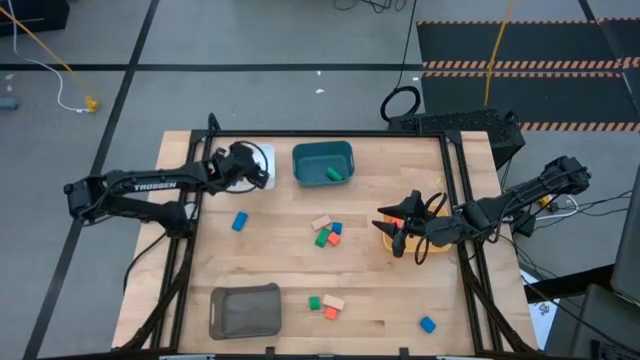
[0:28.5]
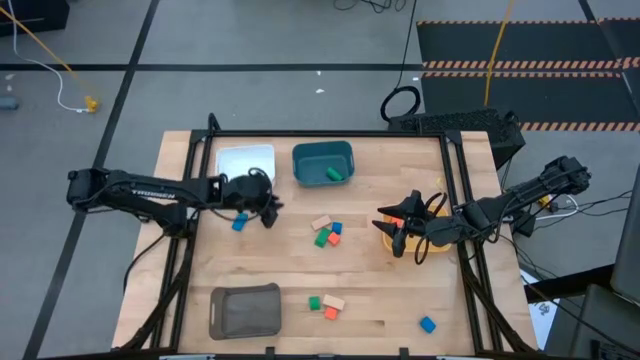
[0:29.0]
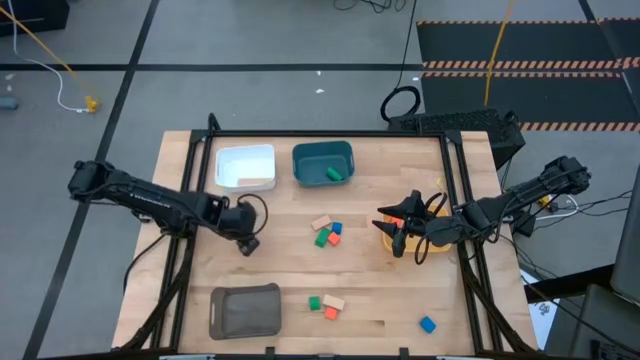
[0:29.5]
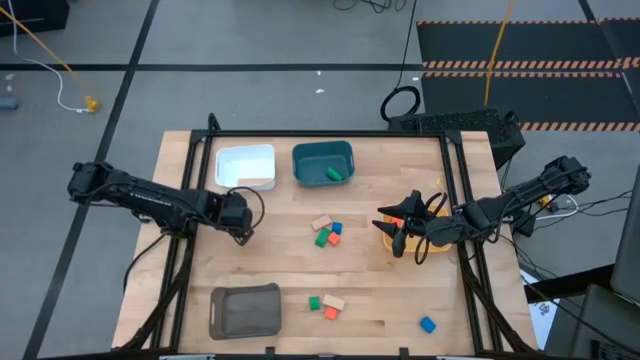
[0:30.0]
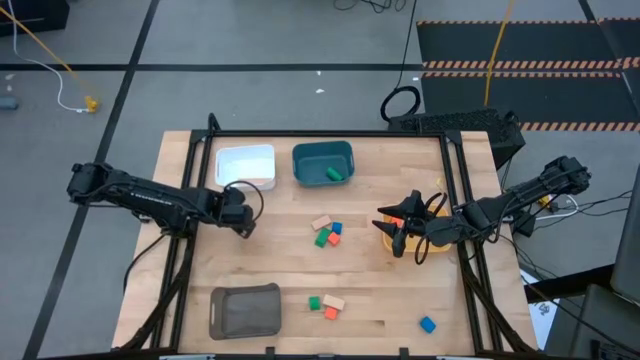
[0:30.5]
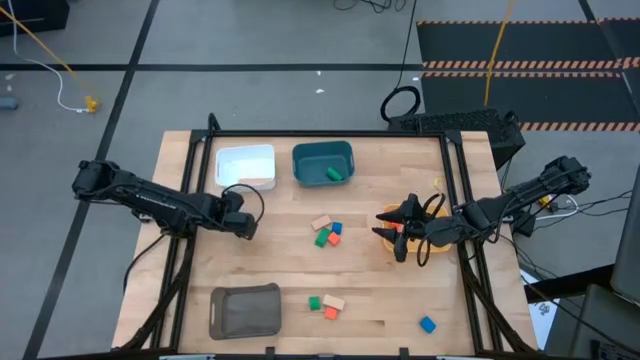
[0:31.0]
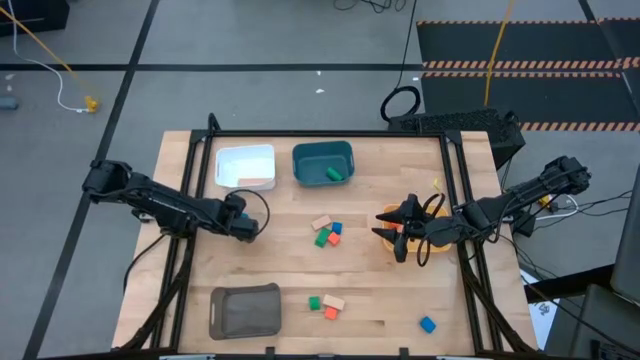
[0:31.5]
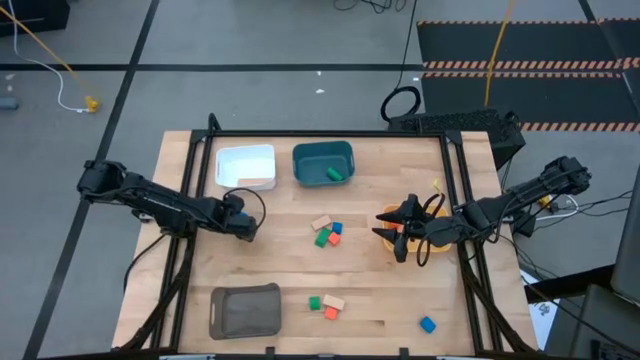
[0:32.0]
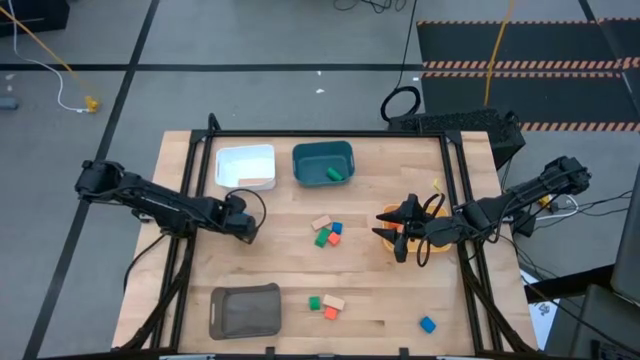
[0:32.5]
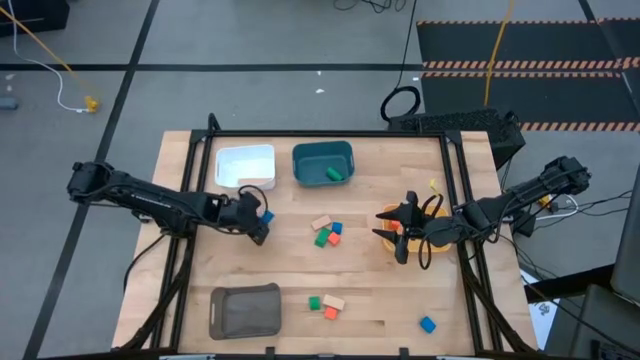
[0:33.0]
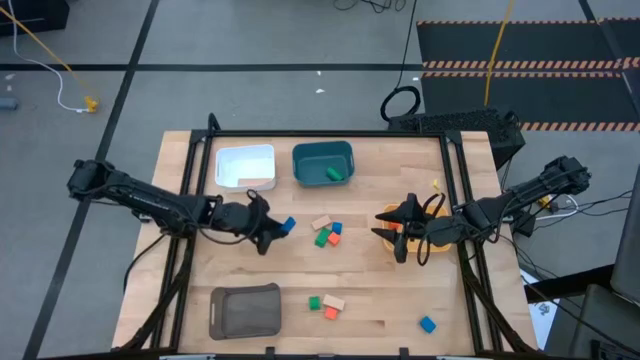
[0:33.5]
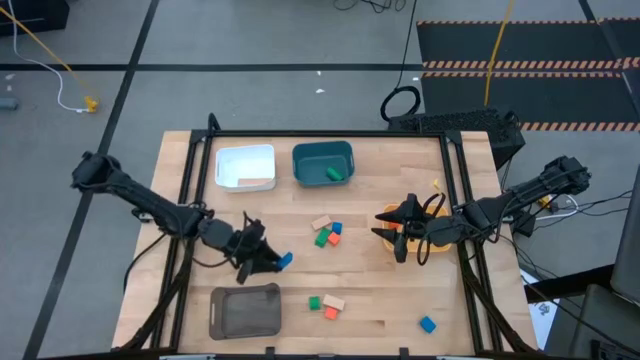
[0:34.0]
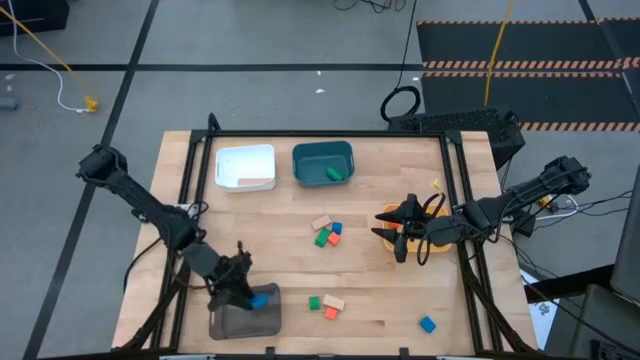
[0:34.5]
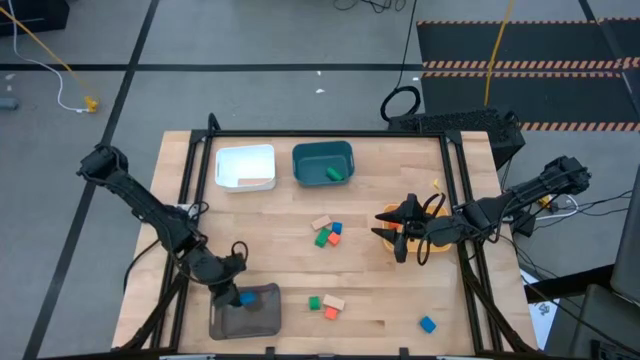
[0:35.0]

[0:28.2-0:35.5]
Task: Sort & place blocks by color
Put the left blue block into the black bin

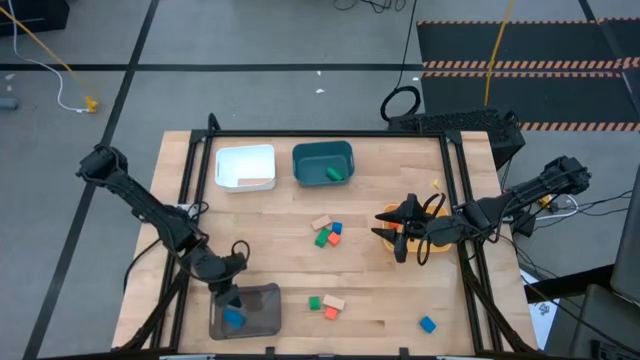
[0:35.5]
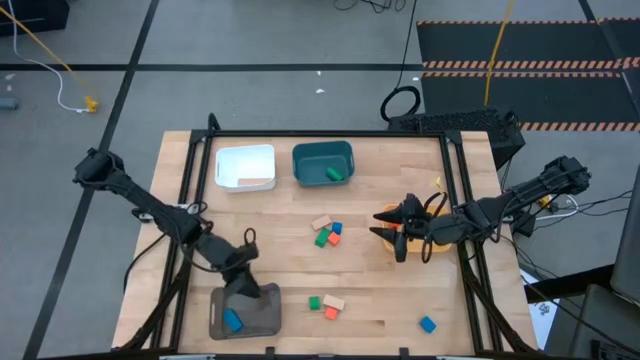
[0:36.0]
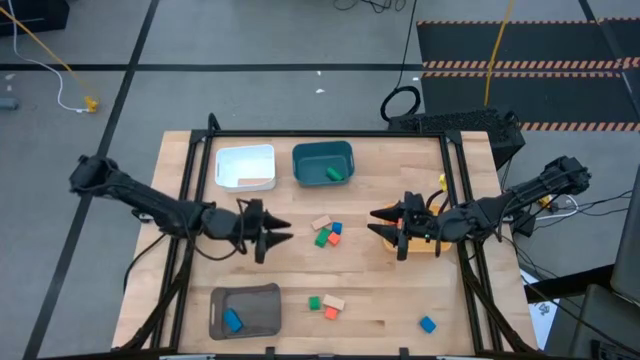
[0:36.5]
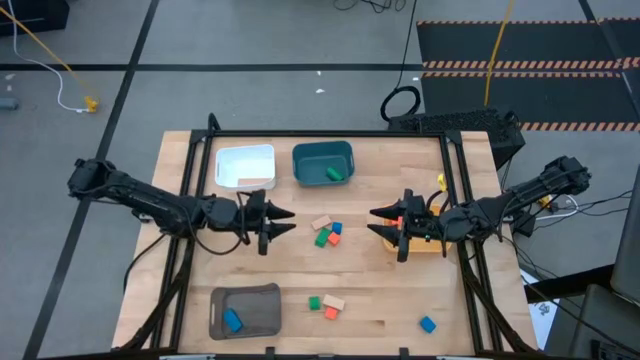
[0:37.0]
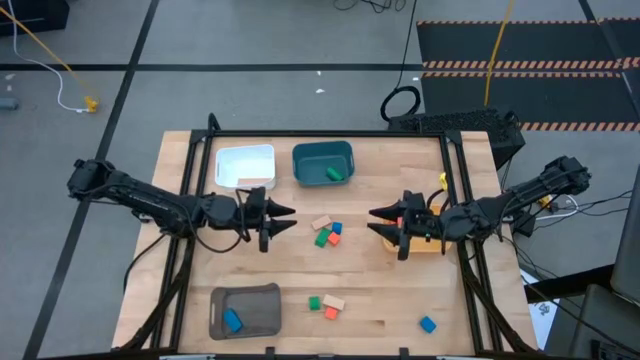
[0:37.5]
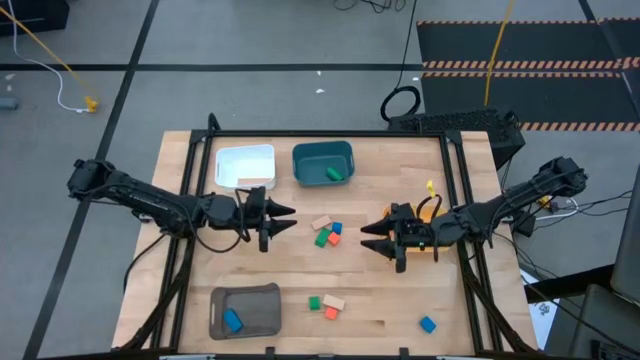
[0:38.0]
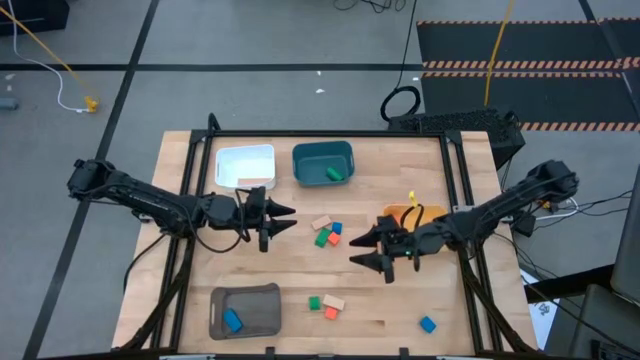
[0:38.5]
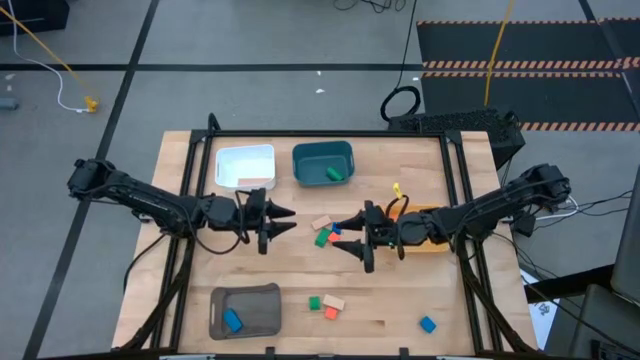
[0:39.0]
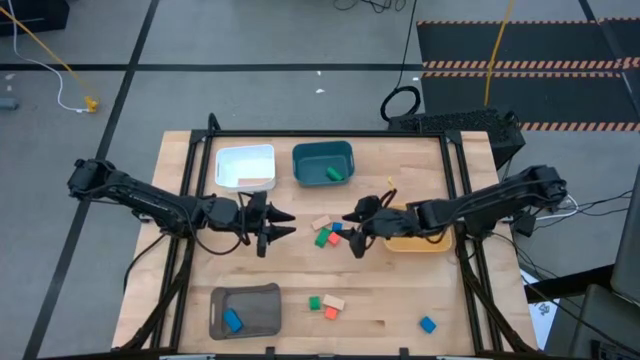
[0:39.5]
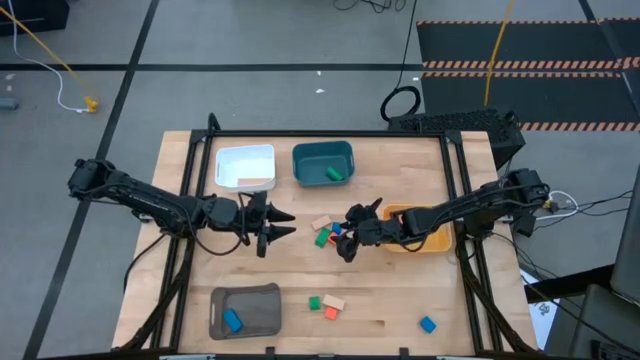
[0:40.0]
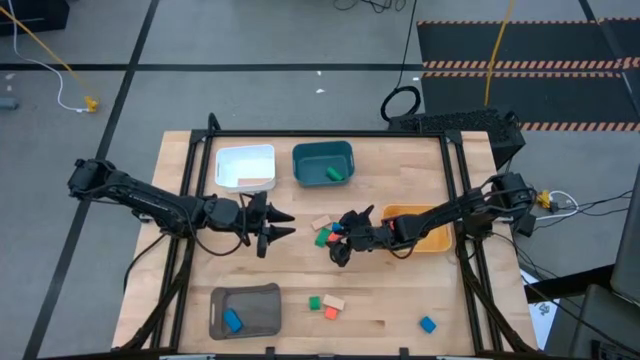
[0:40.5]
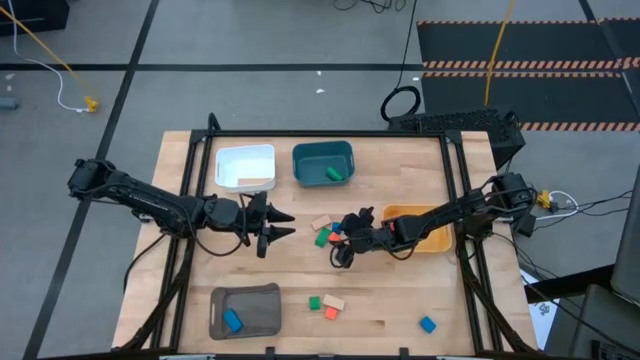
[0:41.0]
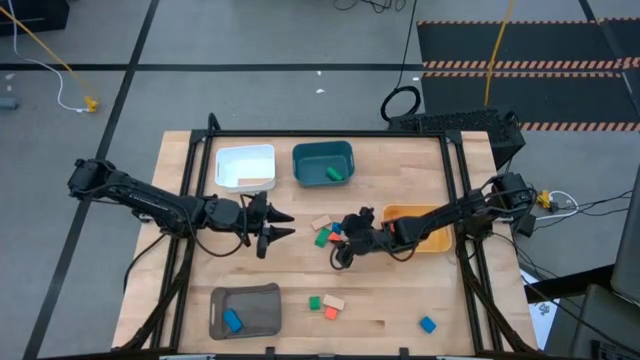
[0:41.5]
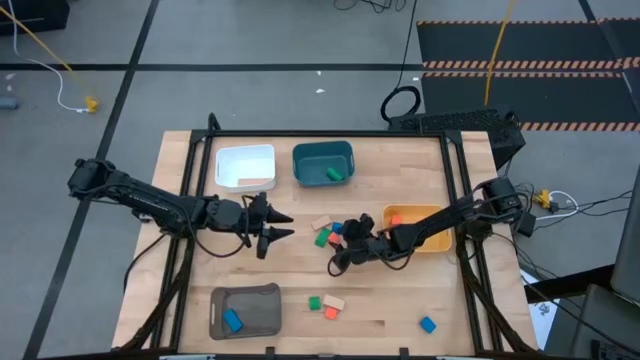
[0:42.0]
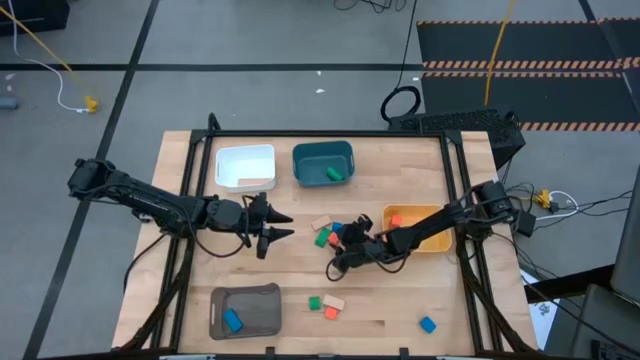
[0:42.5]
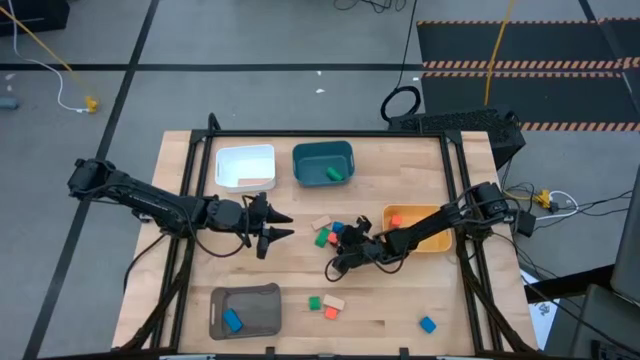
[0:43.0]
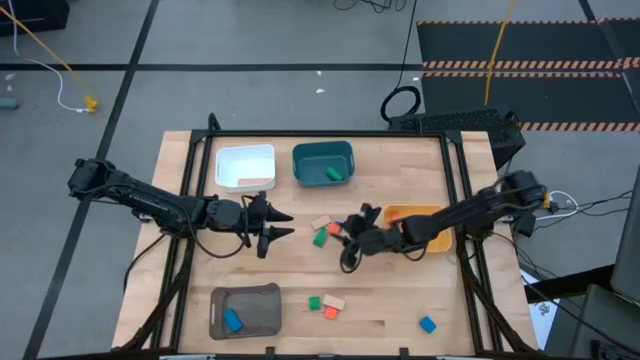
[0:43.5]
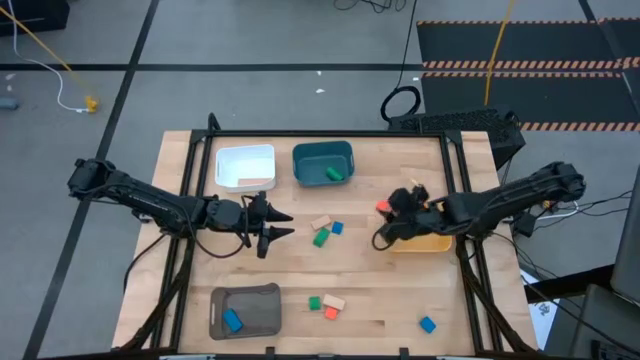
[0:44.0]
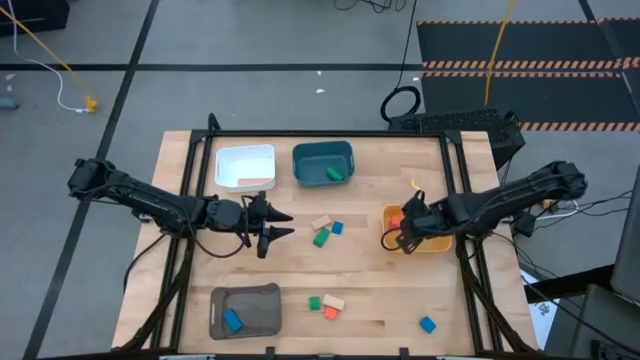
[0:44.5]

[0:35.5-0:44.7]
Put the top orange block into the yellow bin

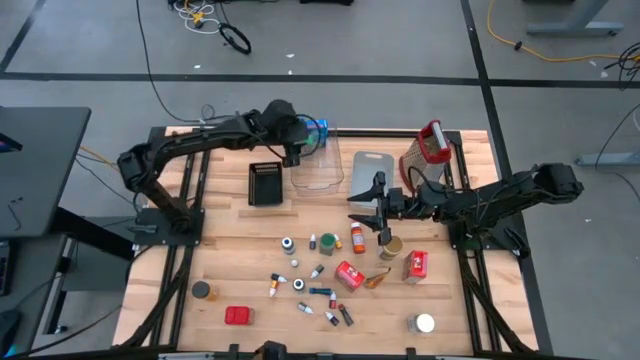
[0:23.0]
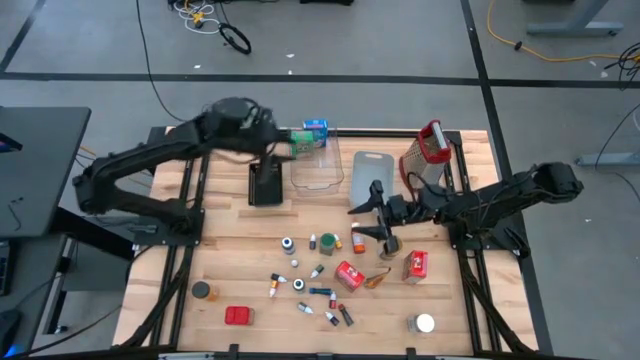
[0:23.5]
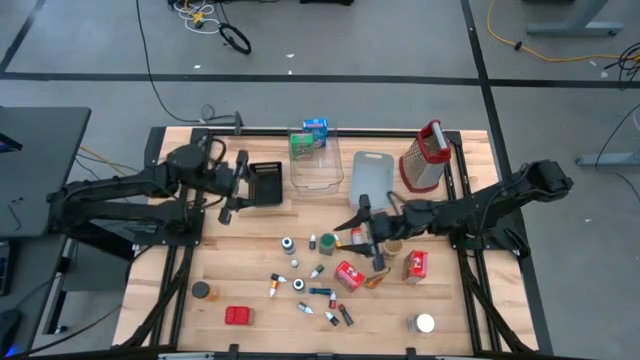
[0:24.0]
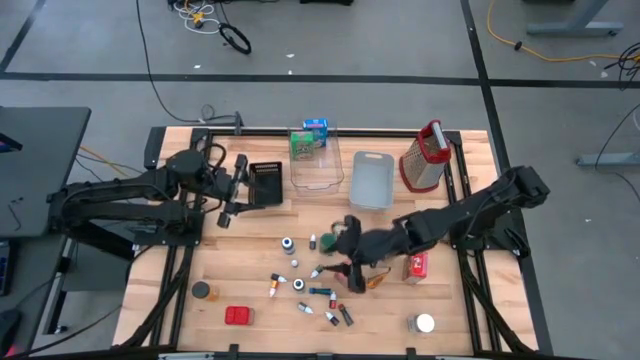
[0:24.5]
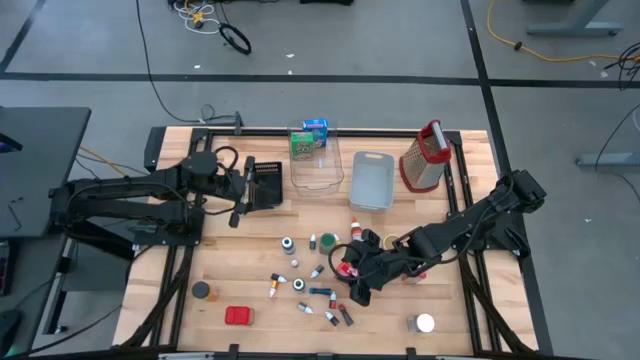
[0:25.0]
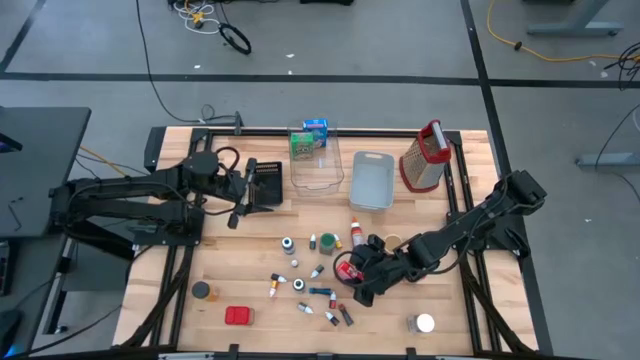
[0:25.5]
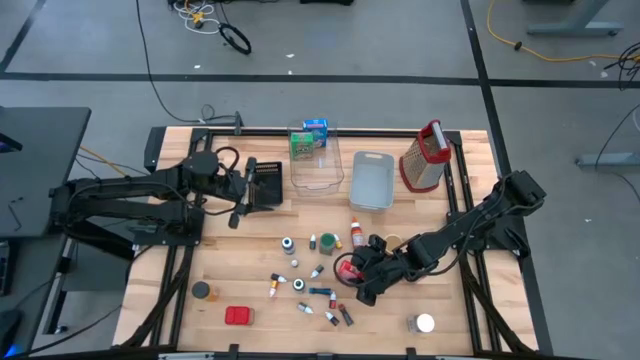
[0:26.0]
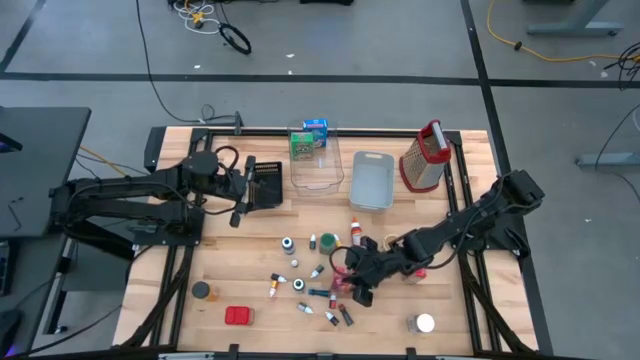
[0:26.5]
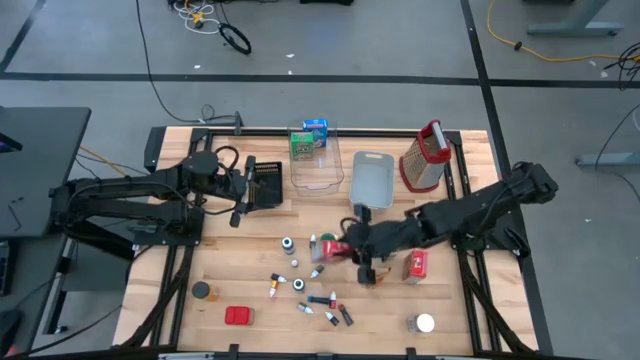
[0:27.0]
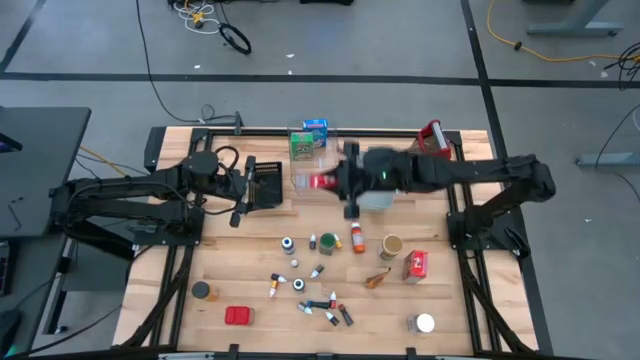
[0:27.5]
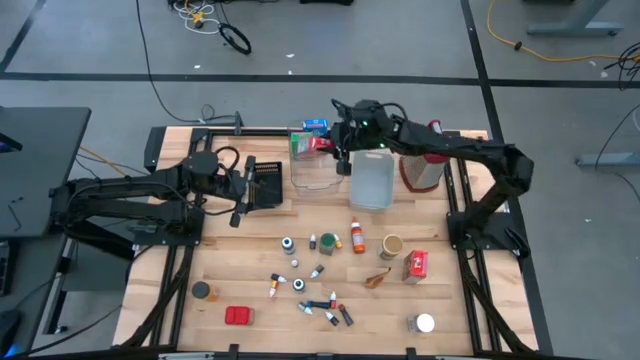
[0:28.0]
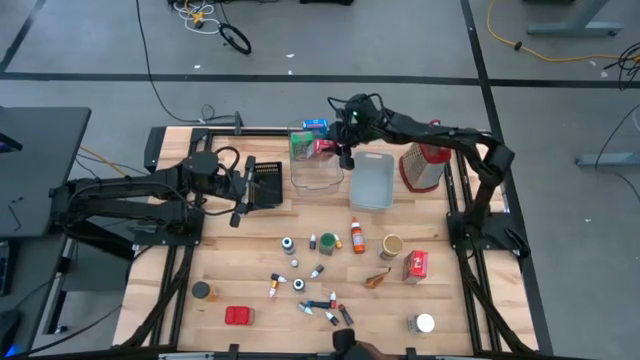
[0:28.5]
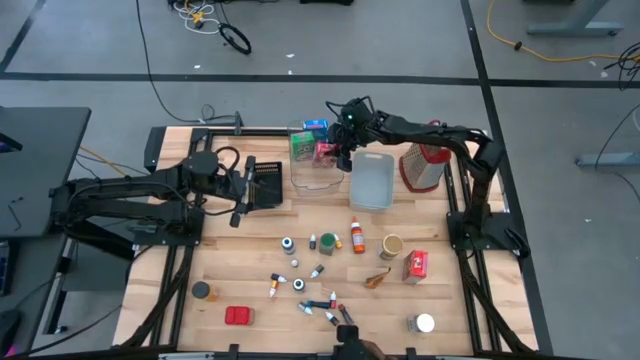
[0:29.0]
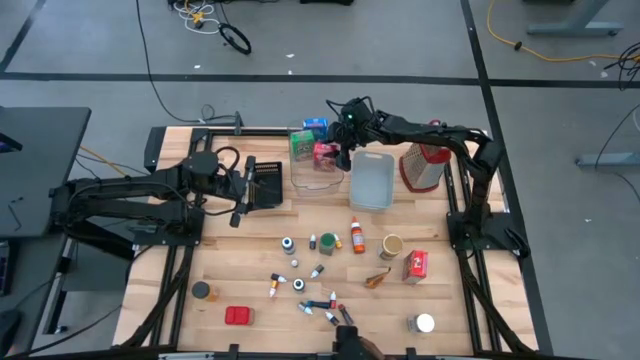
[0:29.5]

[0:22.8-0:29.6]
Task: Pick & Place Kitchen Items
Put the left red cereal box into the transparent bin
